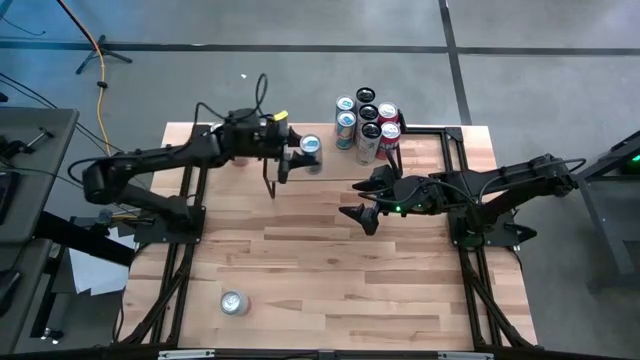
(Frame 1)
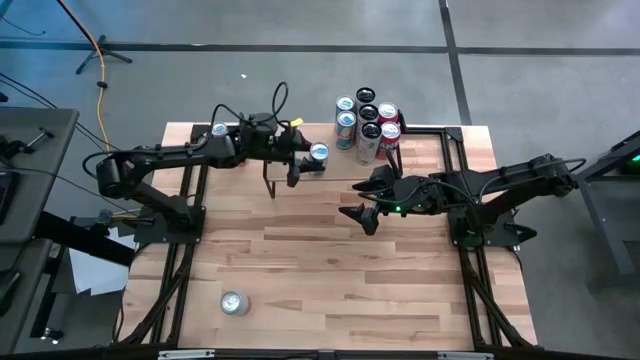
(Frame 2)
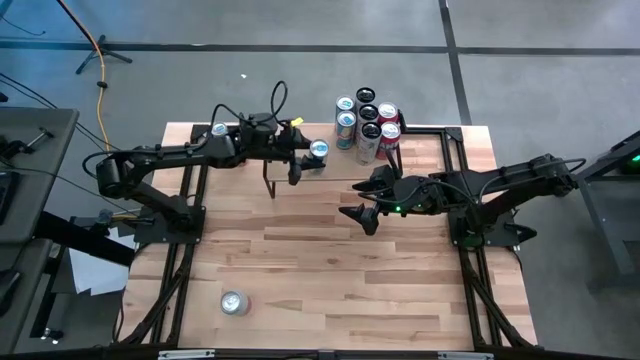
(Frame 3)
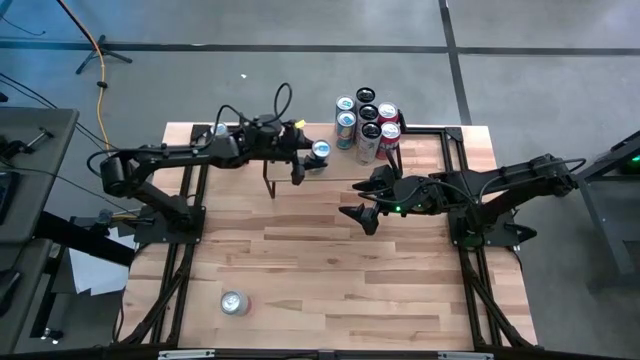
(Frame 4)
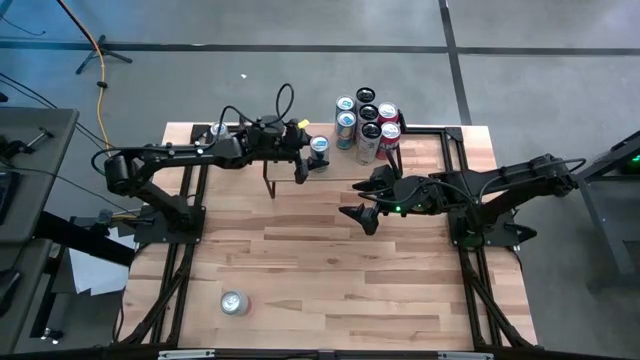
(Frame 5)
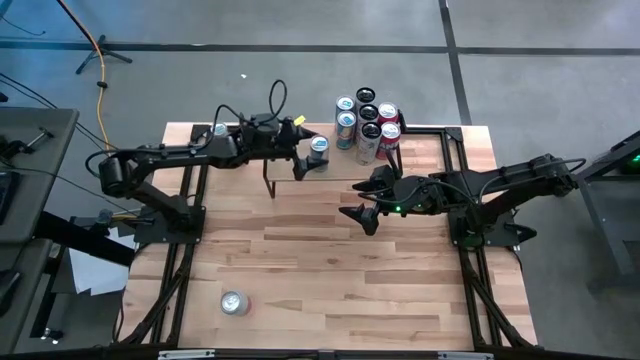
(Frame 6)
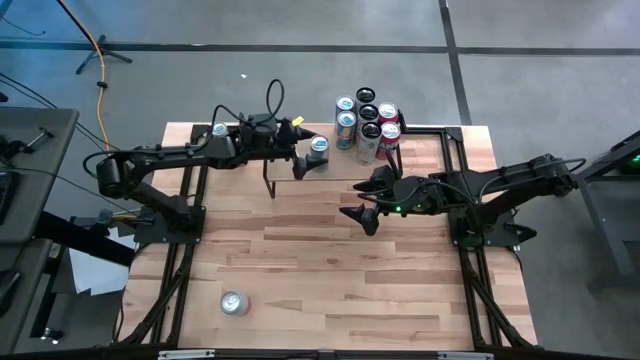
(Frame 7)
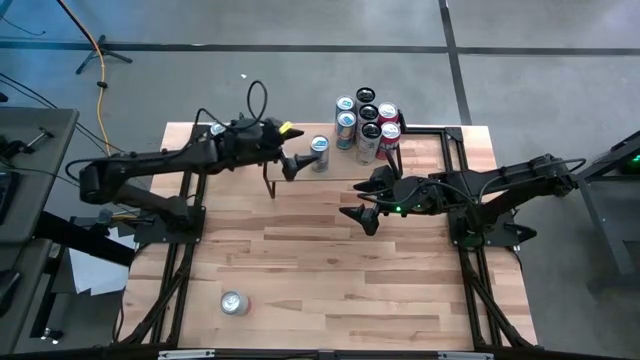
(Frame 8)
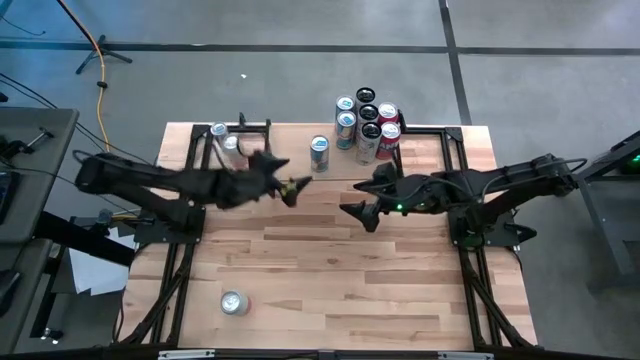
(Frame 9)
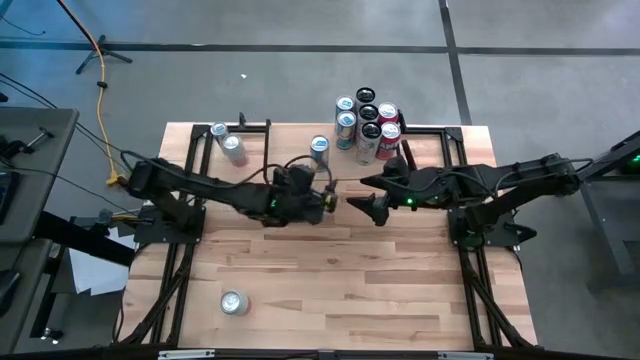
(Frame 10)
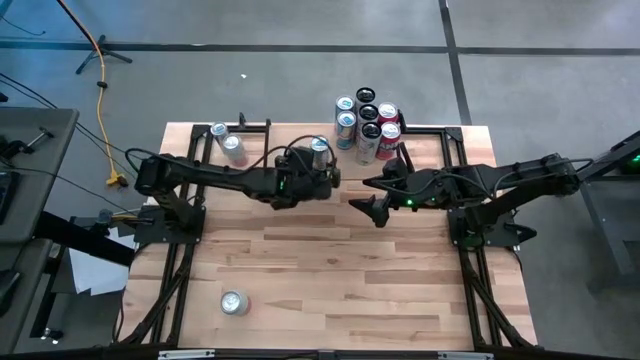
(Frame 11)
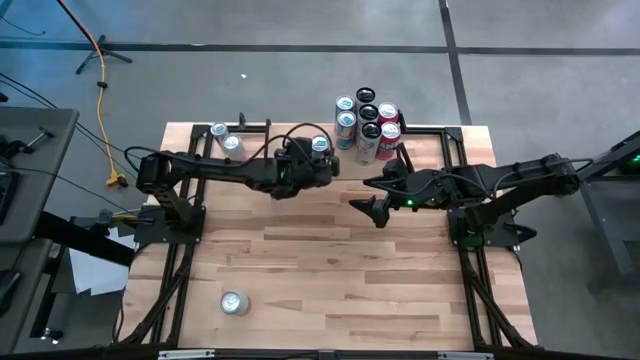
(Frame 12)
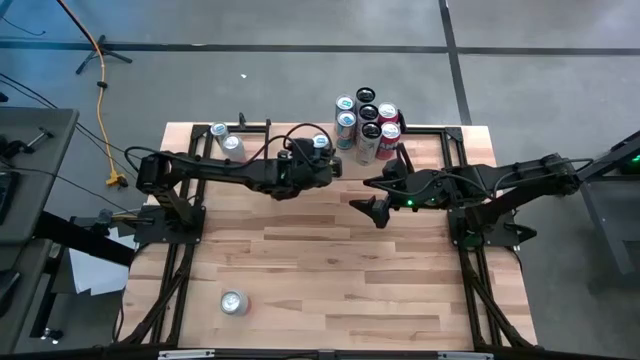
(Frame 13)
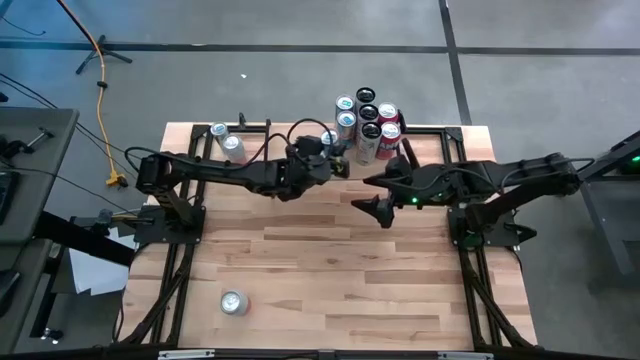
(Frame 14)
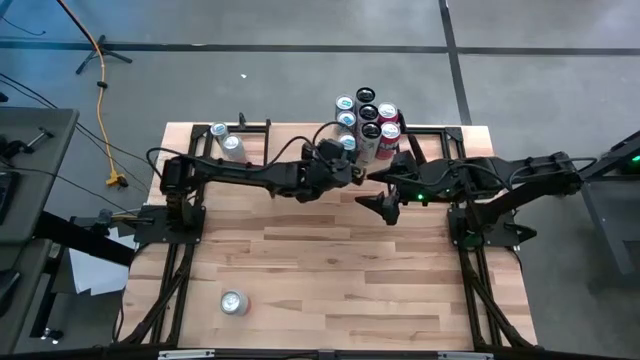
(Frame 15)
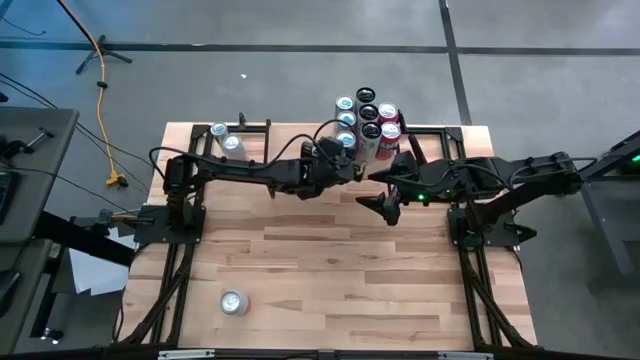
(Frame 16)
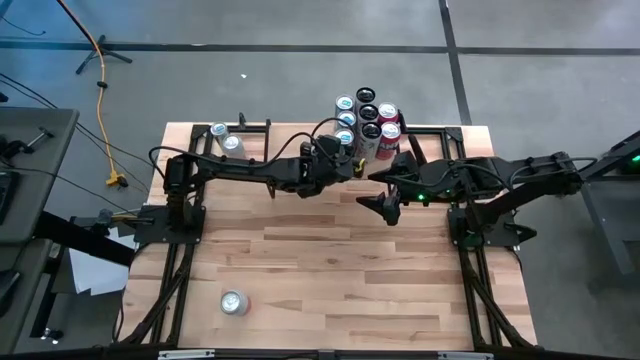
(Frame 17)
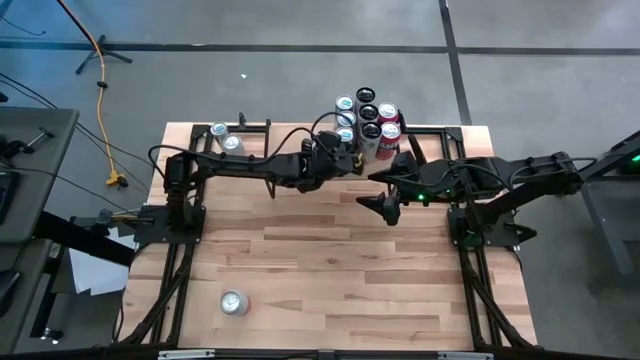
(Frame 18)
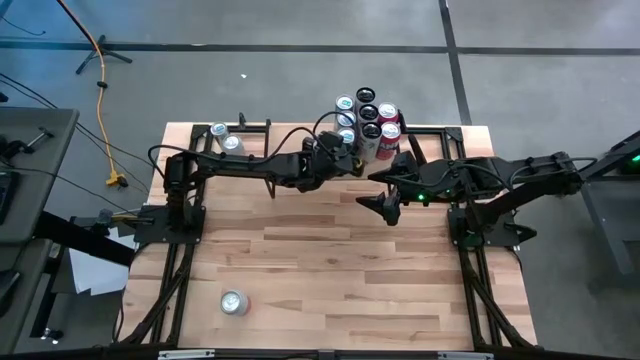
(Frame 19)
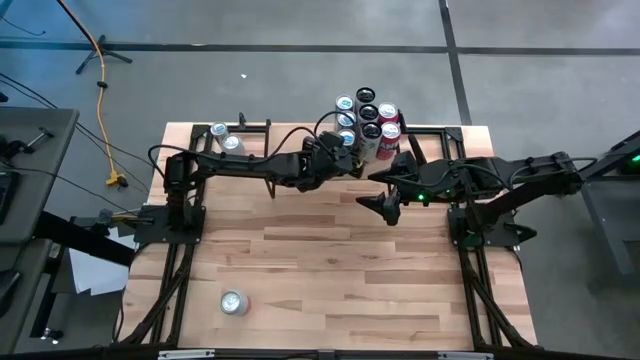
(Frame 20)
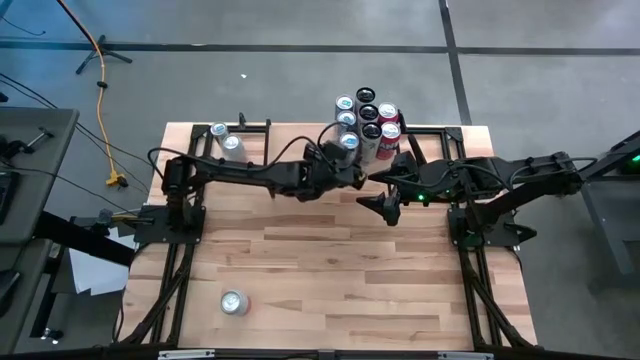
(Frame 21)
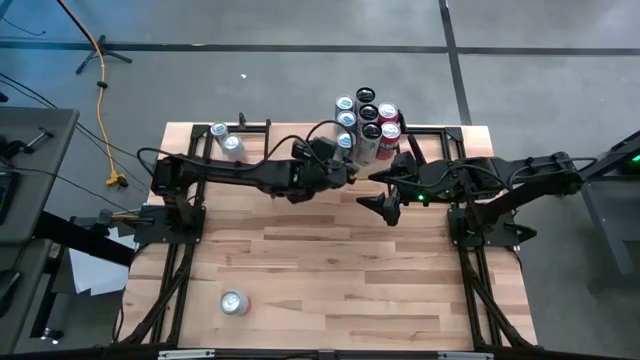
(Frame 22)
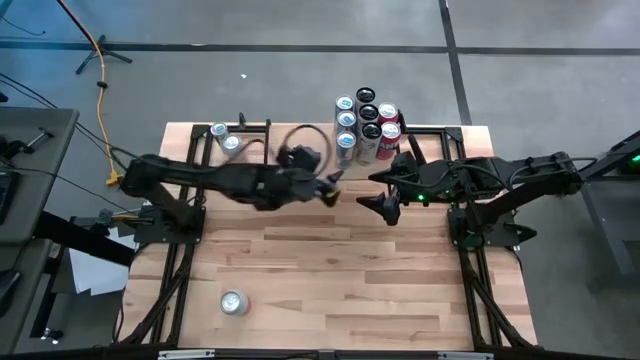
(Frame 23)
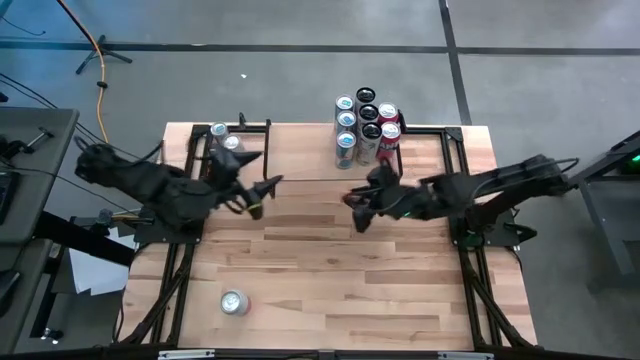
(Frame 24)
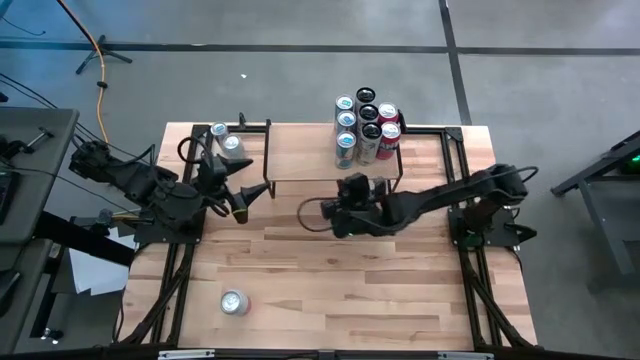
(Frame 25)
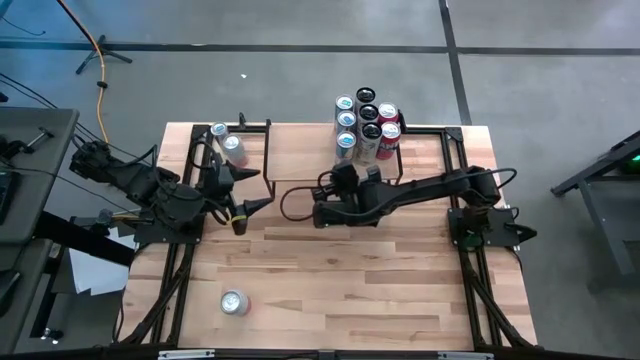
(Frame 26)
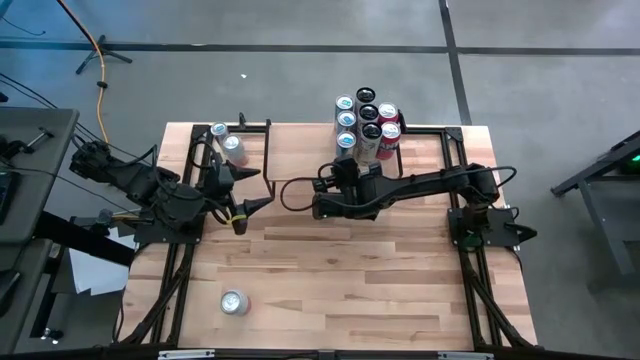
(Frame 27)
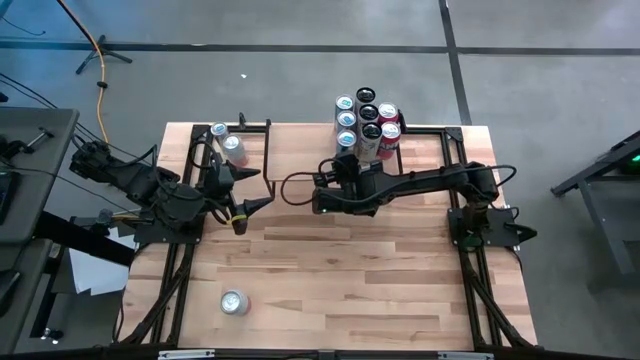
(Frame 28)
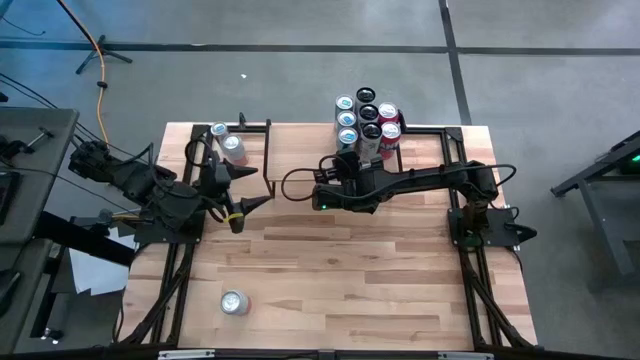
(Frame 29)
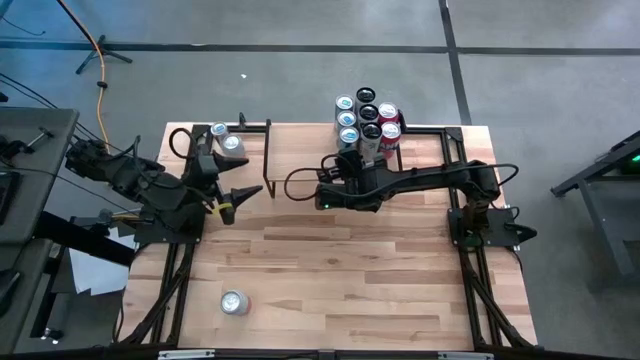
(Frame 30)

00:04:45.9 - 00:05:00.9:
Task: Place canned beverage on shelf
Put the bottom blue soda can on the shelf aligned with the blue soda can

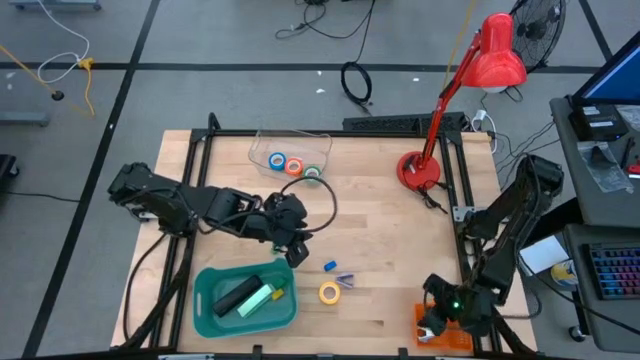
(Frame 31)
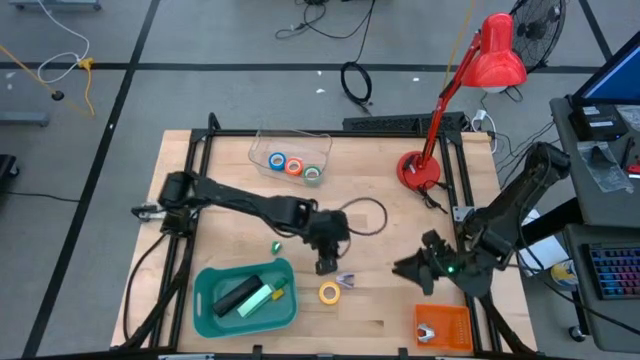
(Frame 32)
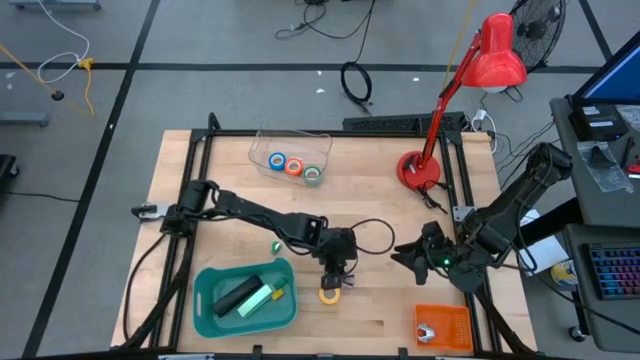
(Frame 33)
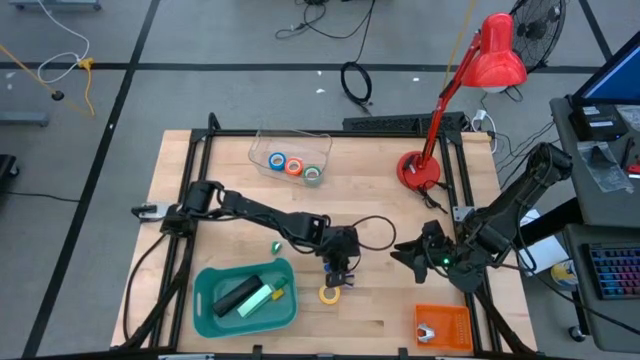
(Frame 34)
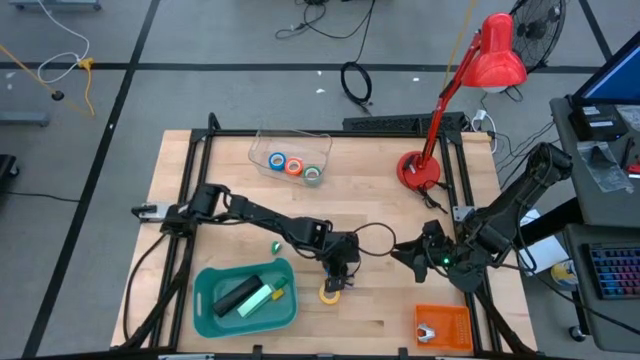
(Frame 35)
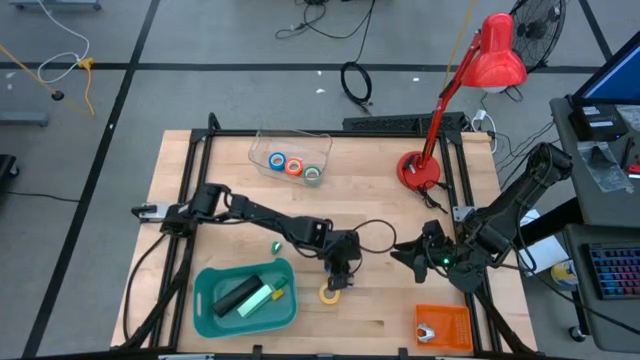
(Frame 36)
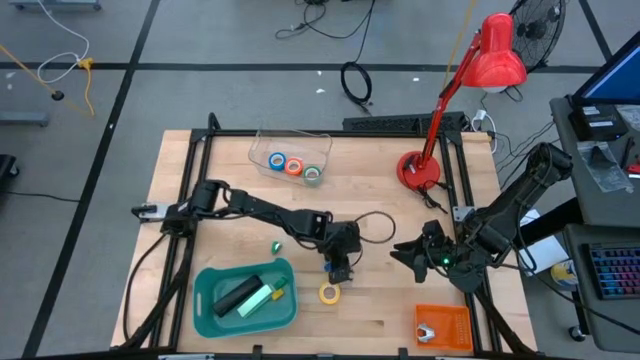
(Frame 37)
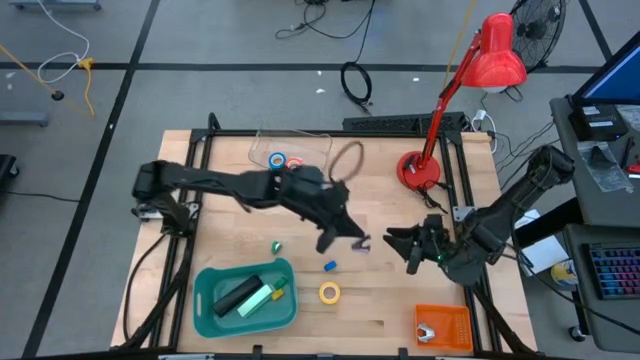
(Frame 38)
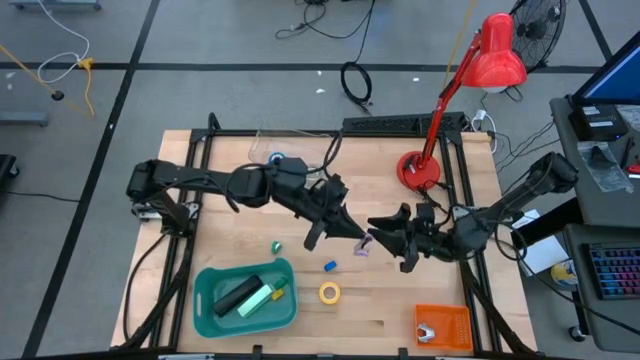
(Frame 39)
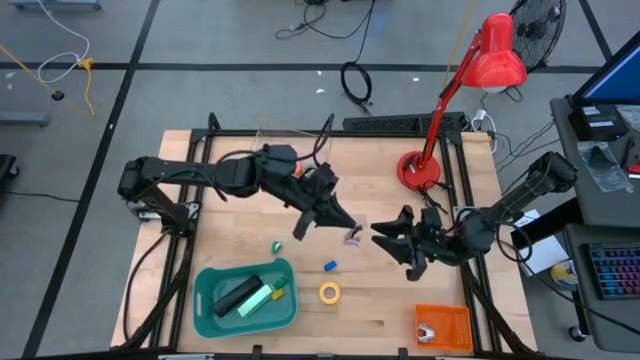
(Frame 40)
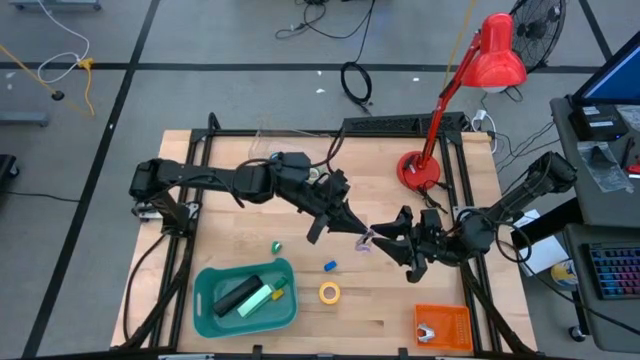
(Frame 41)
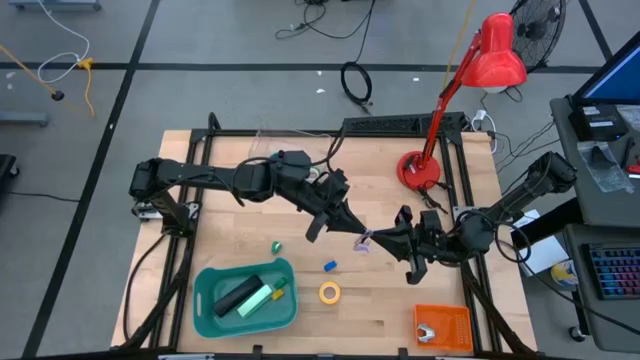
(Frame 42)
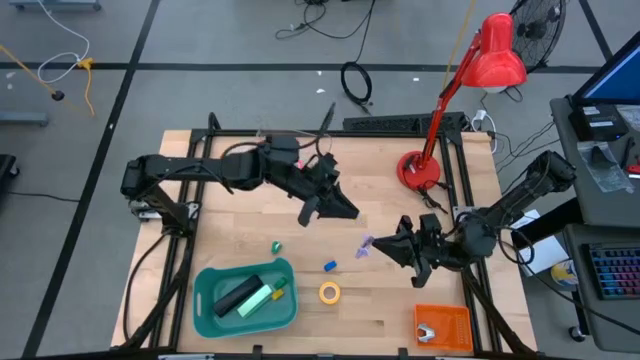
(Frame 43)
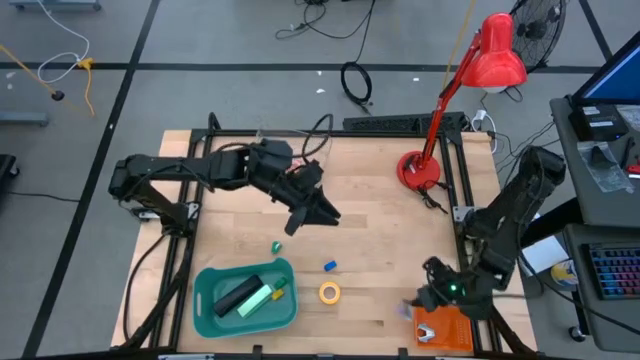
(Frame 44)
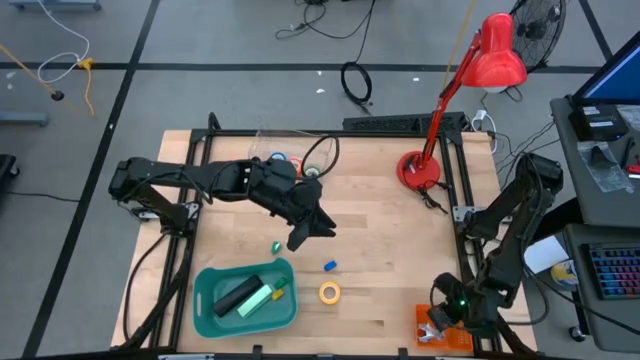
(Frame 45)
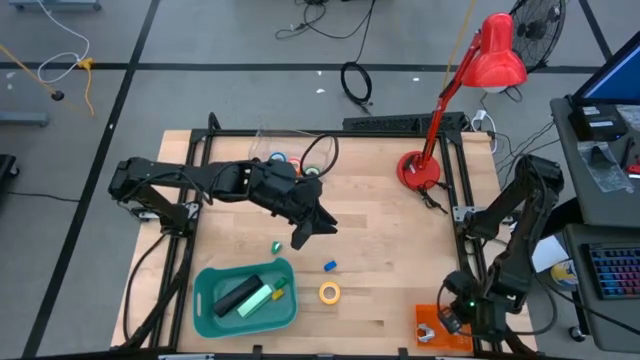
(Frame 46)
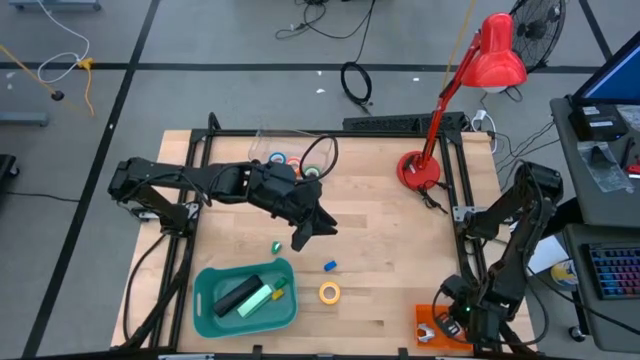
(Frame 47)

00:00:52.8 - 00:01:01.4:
Task: Pick and place Stapler, Stapler remover, tape
Put the purple staple remover into the orange bin
